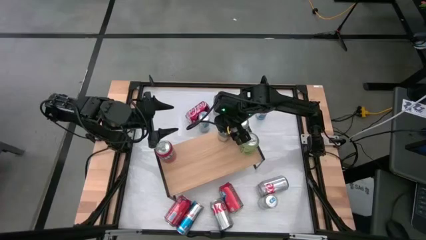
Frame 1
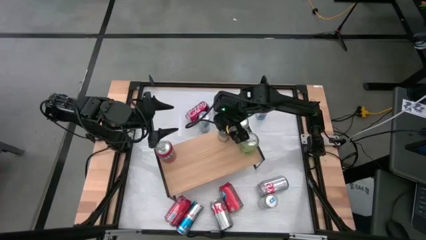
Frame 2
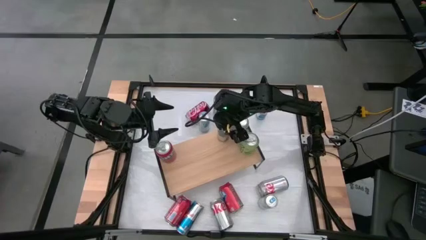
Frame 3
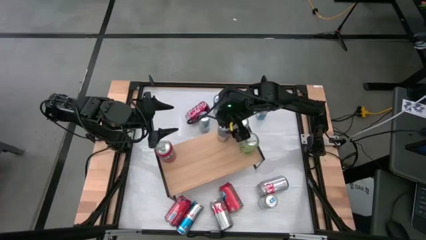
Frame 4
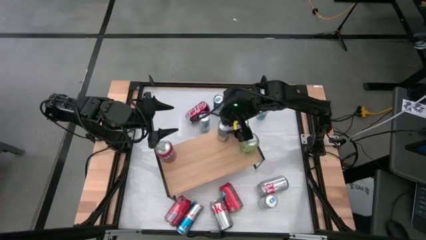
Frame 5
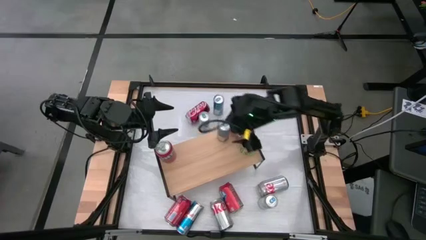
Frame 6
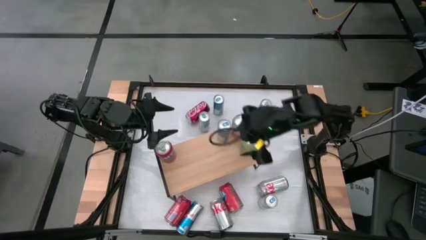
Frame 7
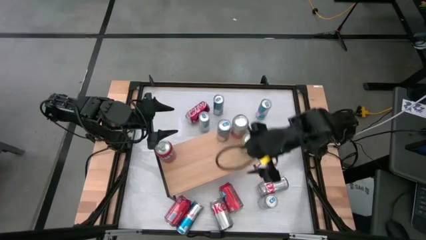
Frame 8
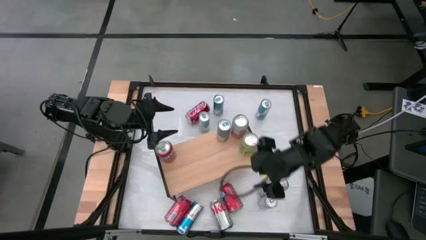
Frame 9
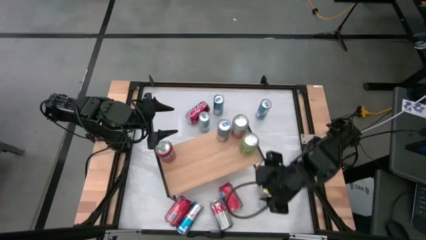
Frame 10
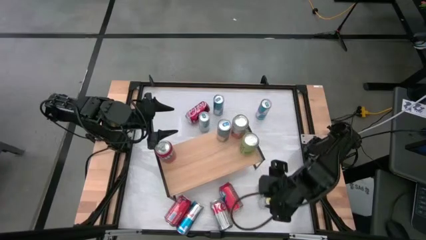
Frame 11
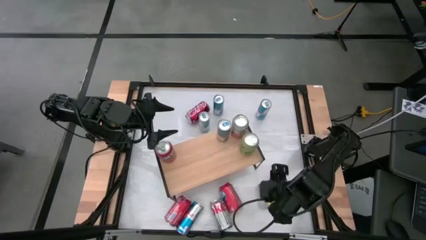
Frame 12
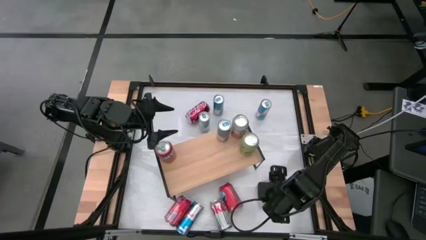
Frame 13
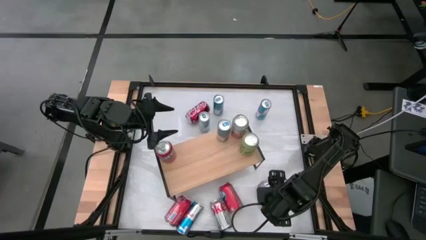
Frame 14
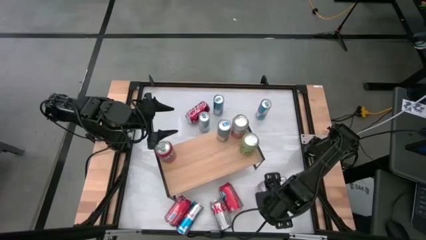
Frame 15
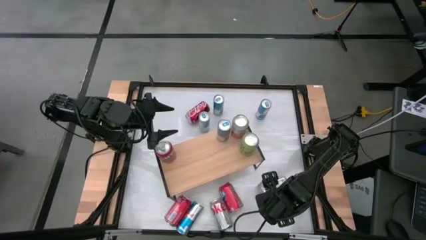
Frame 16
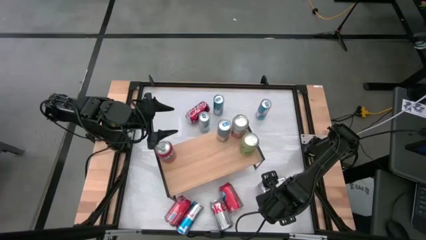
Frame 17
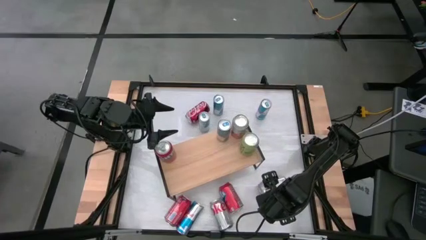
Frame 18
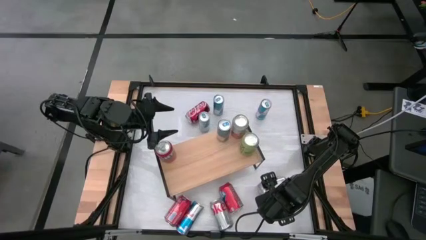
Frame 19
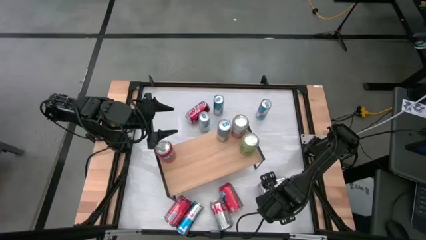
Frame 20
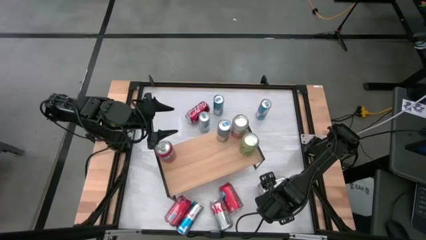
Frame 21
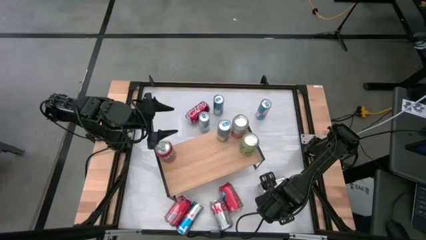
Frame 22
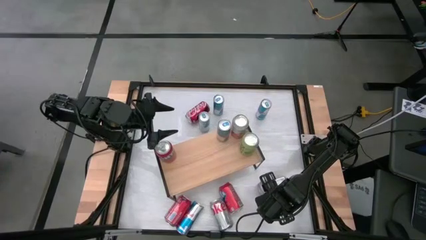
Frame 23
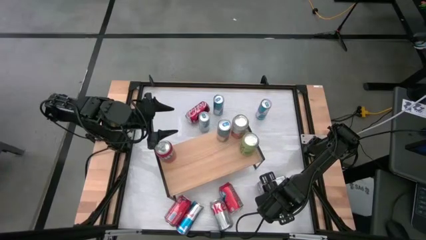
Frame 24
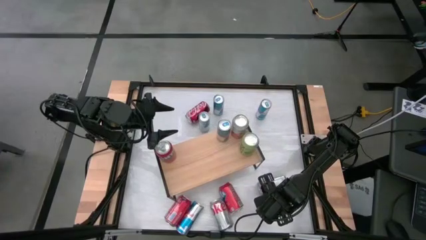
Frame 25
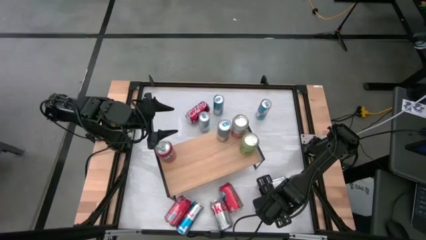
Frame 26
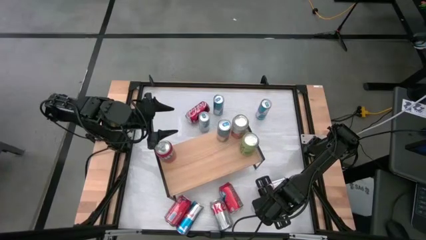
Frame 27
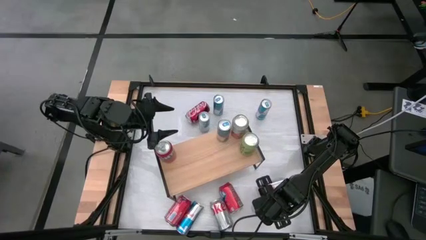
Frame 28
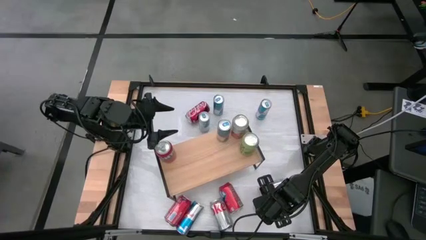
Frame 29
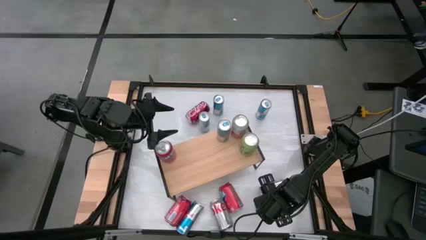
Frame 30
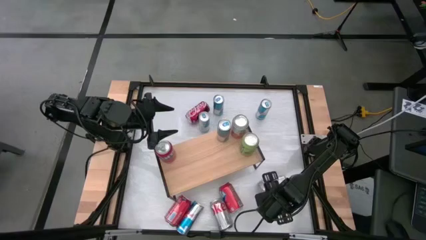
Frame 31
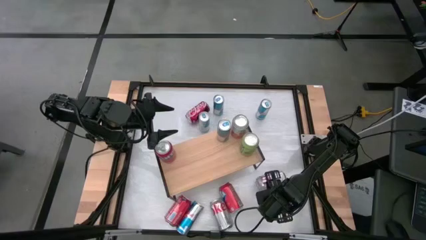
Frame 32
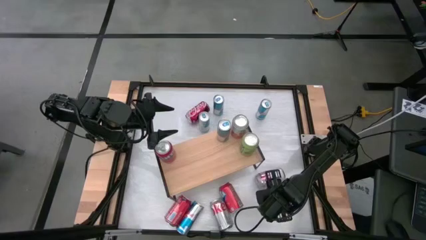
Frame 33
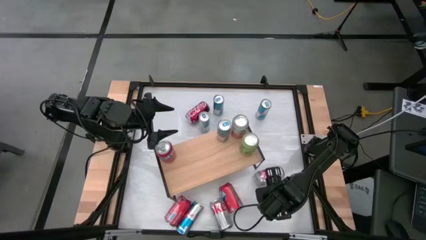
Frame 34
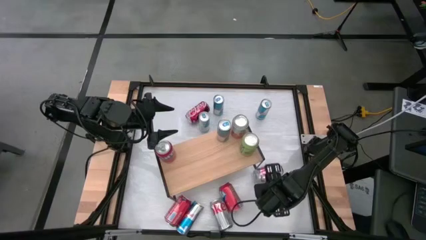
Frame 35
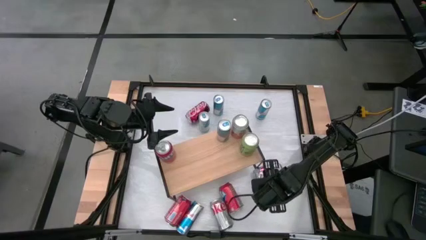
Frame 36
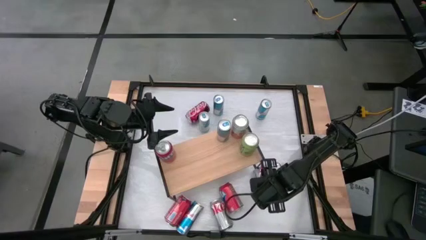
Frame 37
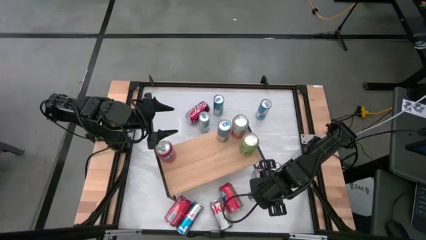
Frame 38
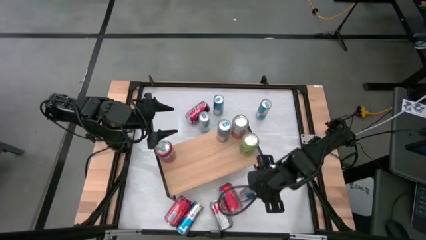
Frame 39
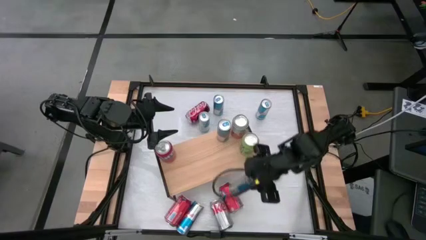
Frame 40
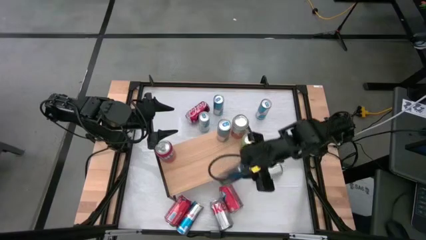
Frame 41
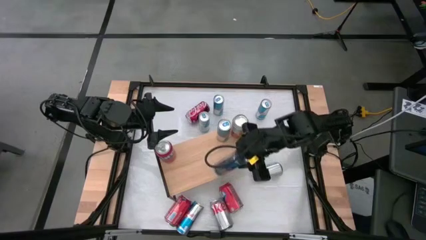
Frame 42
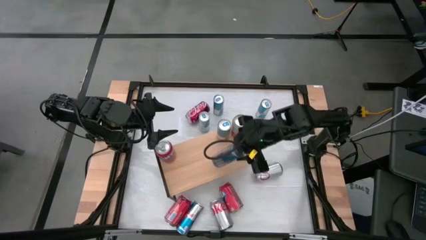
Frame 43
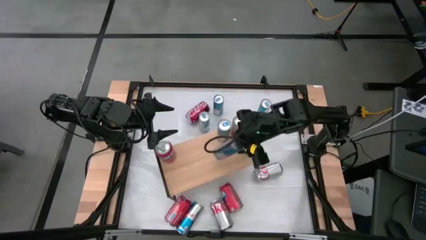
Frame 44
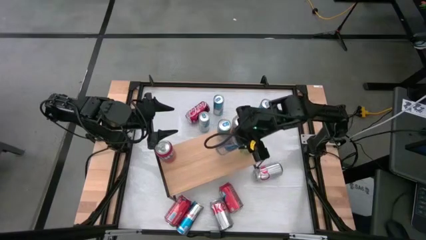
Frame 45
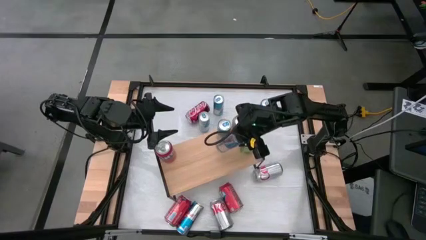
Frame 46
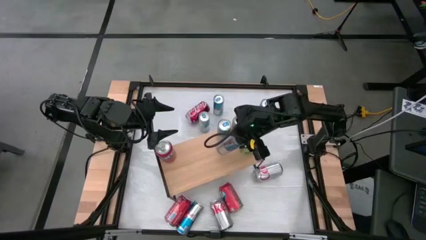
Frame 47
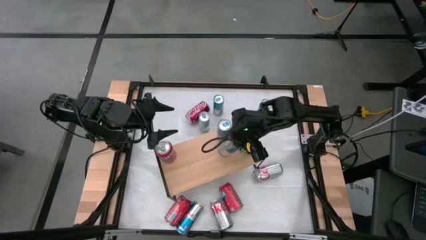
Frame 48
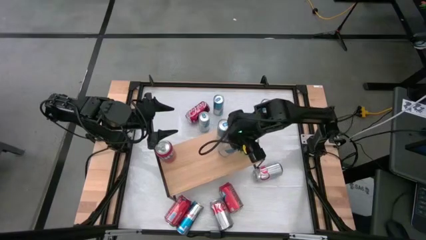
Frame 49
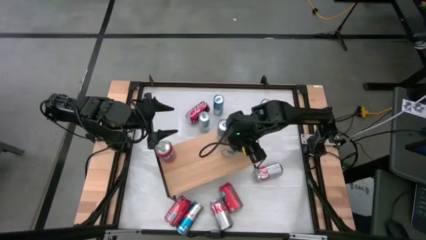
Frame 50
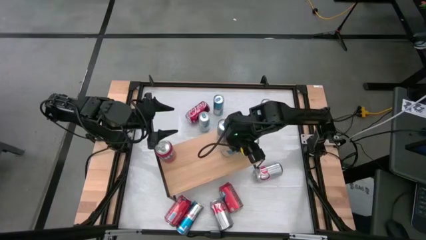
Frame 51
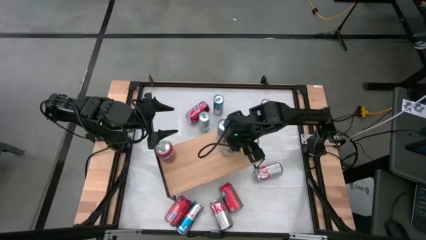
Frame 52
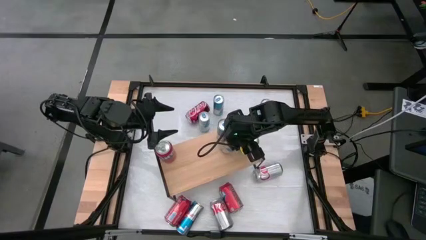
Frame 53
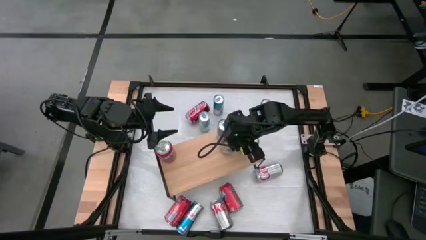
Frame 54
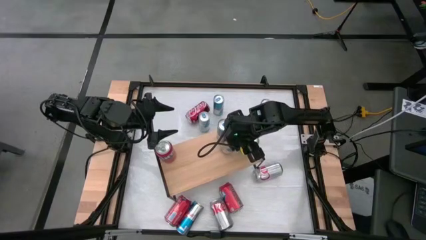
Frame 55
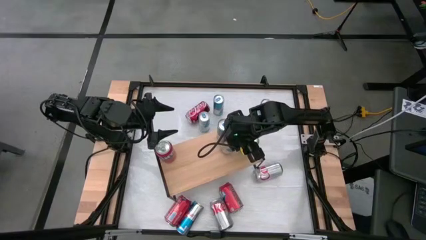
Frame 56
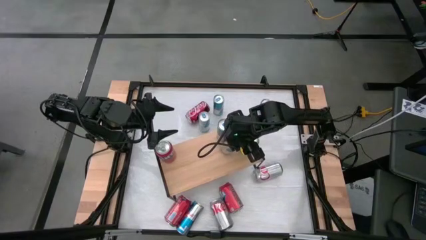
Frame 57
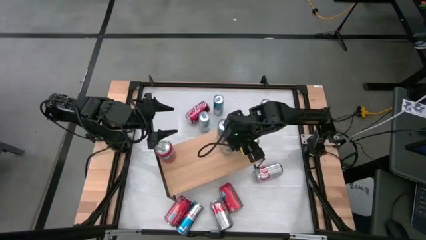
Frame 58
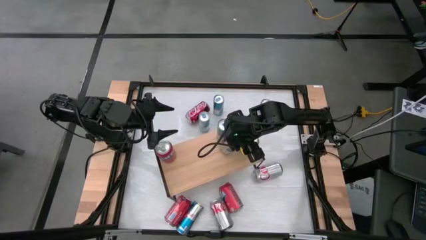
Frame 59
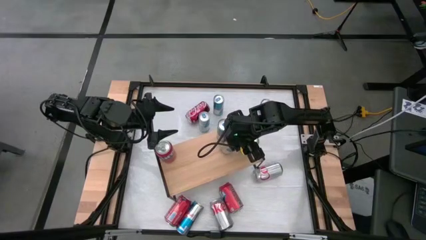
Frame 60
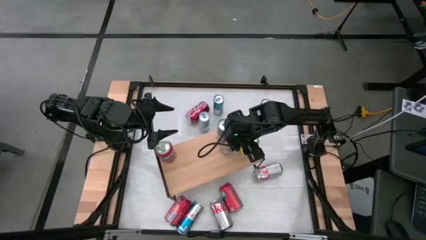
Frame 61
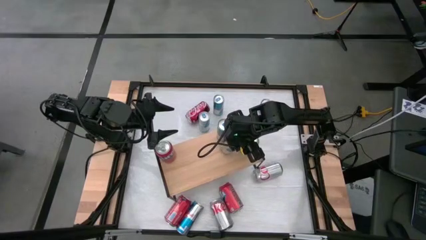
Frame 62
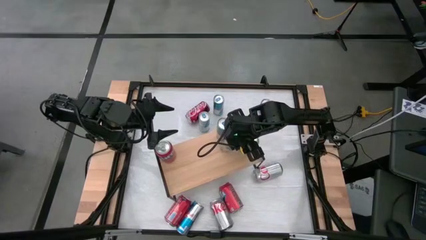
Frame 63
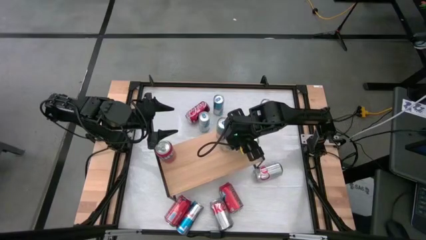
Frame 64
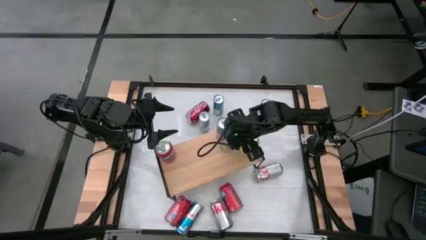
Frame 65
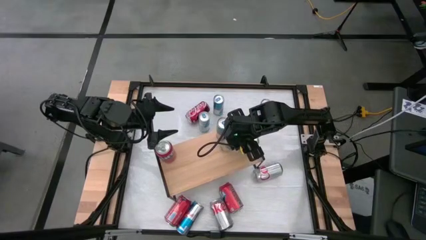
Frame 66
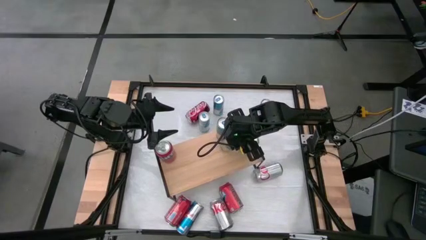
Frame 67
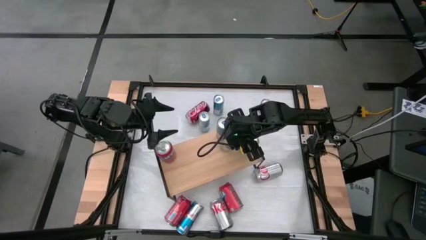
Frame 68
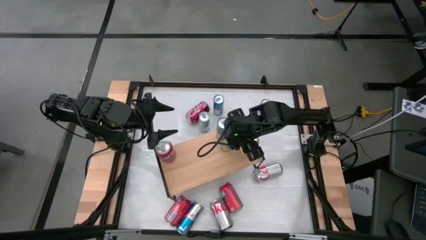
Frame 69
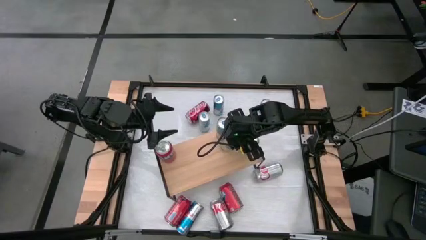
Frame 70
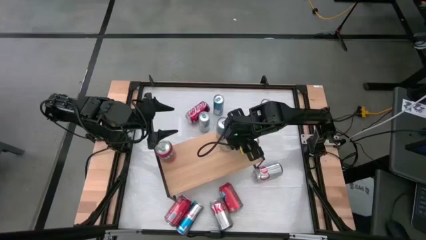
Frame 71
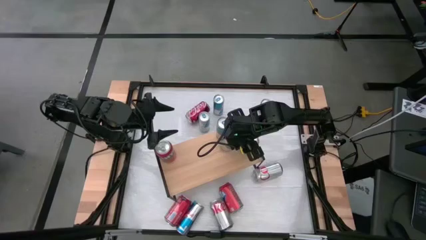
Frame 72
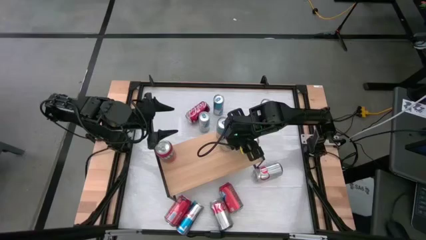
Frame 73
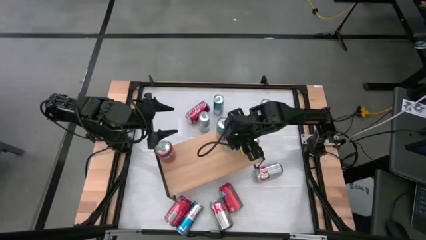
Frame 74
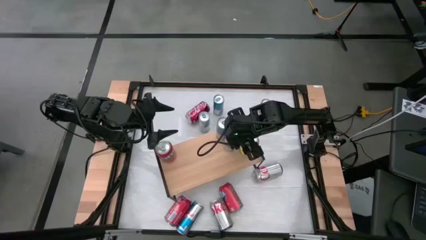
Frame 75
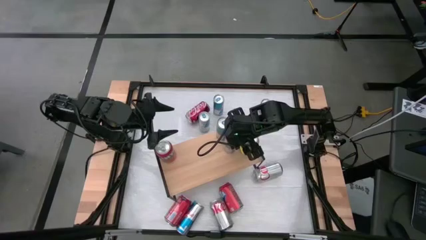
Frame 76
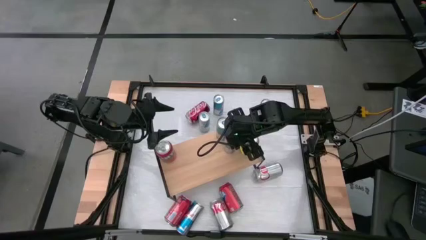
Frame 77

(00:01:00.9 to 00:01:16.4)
Task: Place canned beverage on shelf
Put the blue soda can on the shelf aligned with the other blue soda can

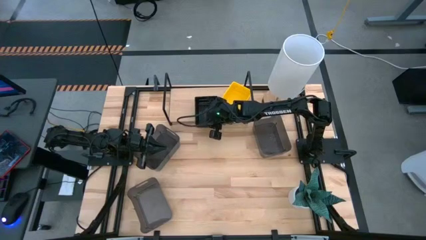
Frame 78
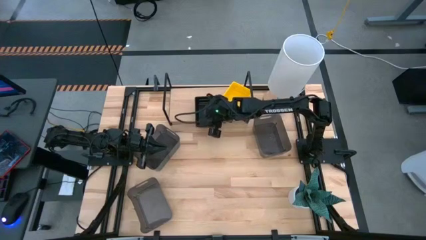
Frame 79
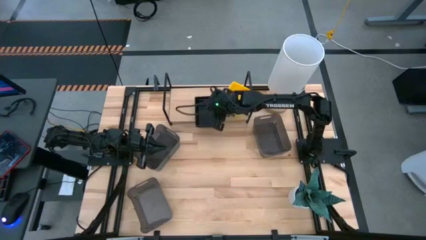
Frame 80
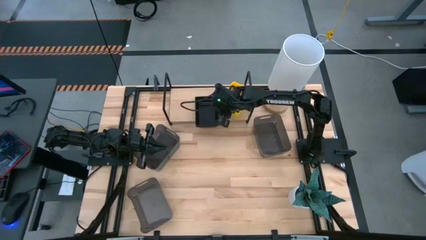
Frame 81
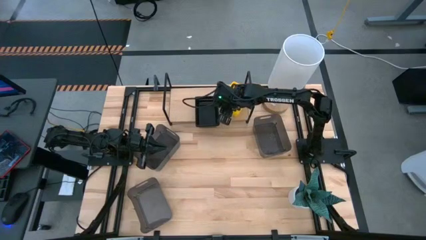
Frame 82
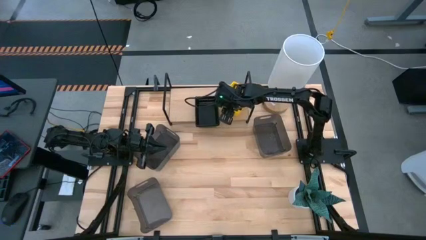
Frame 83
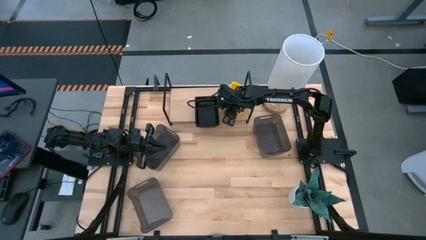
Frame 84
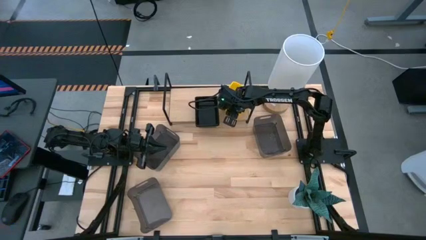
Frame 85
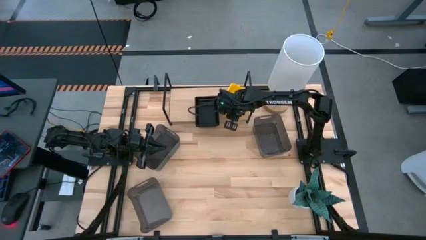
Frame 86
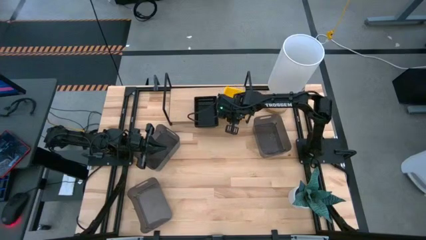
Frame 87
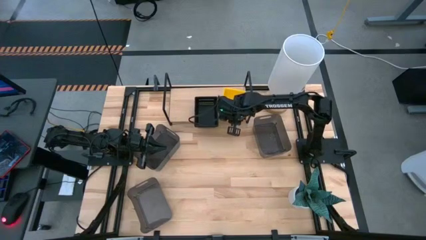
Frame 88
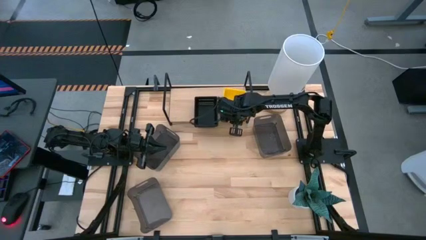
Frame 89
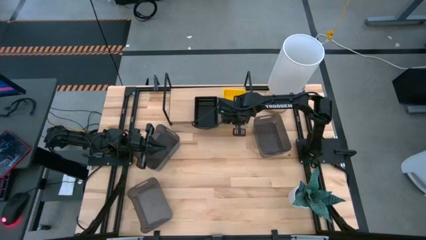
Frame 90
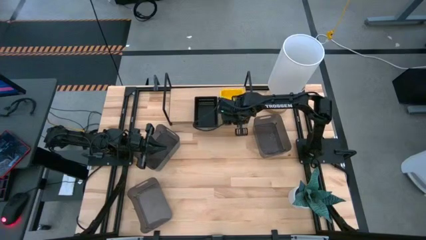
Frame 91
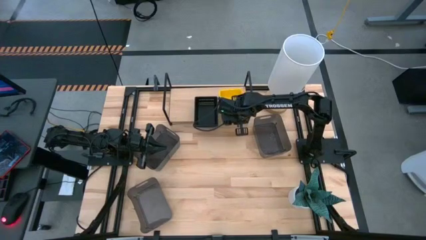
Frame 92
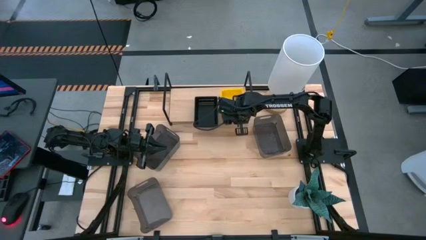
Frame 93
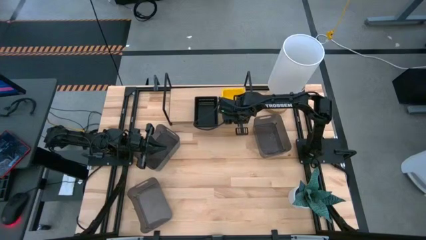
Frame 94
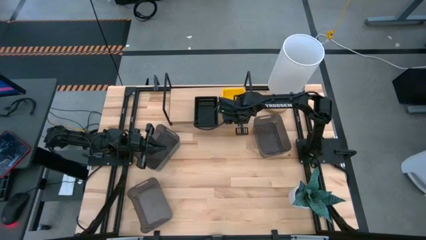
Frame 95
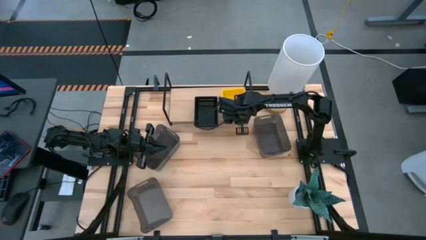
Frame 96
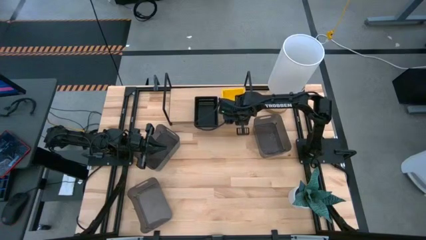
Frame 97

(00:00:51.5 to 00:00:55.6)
Task: Stack baskets on shelf by color
Adjust the stacked yellow bins
